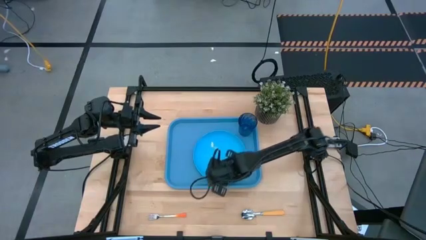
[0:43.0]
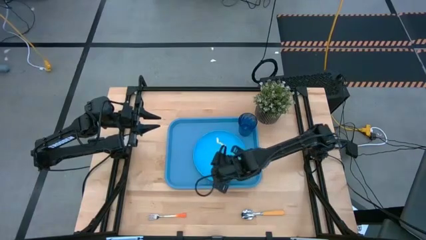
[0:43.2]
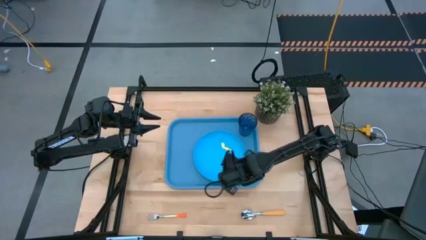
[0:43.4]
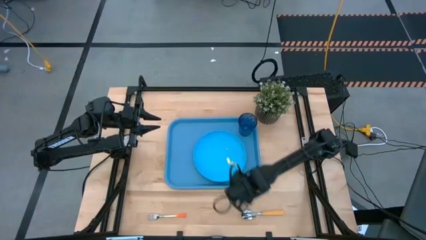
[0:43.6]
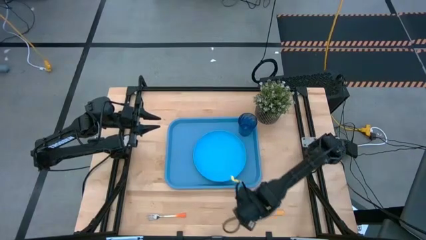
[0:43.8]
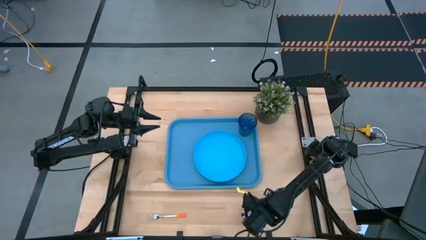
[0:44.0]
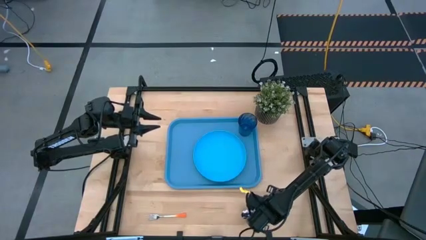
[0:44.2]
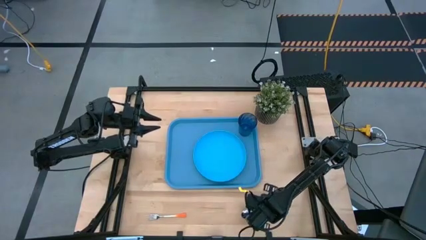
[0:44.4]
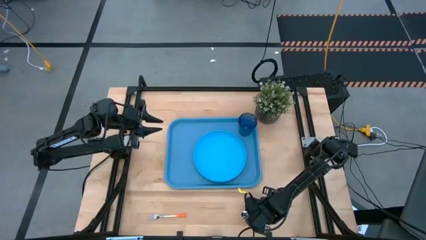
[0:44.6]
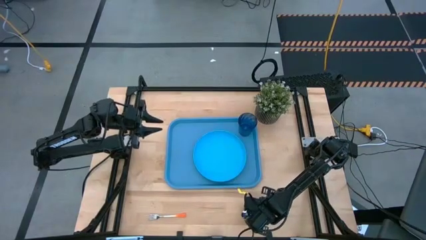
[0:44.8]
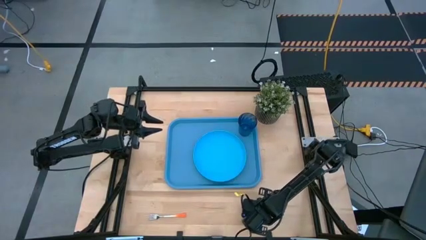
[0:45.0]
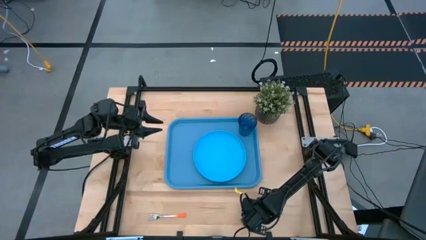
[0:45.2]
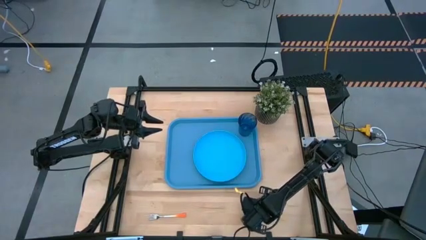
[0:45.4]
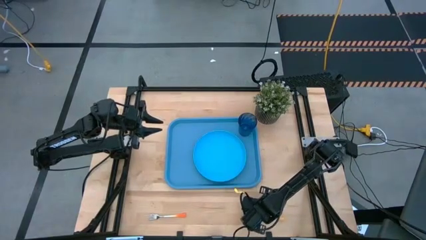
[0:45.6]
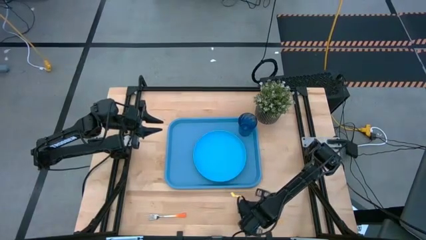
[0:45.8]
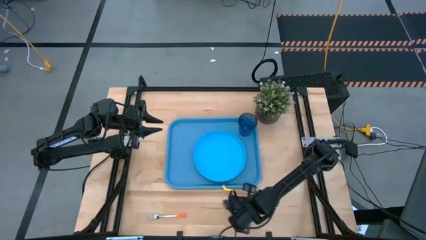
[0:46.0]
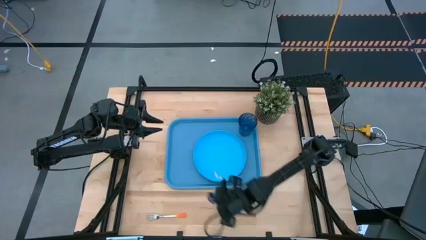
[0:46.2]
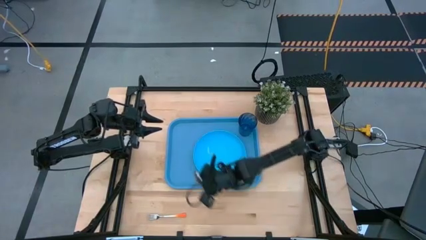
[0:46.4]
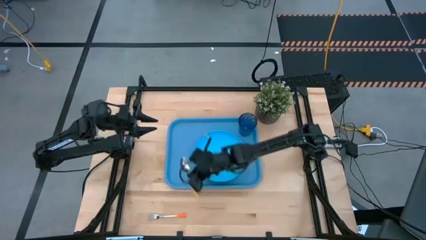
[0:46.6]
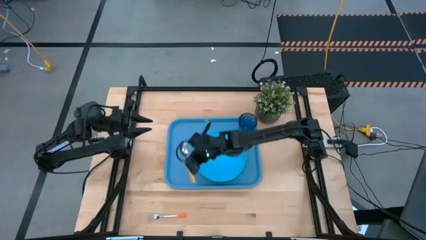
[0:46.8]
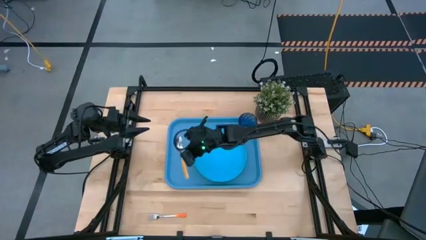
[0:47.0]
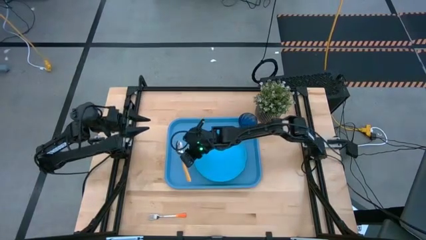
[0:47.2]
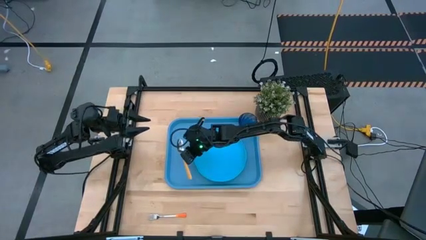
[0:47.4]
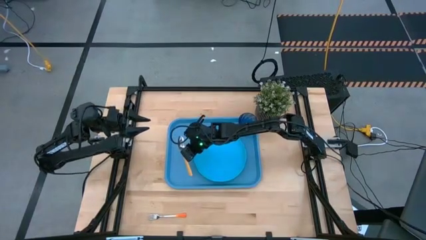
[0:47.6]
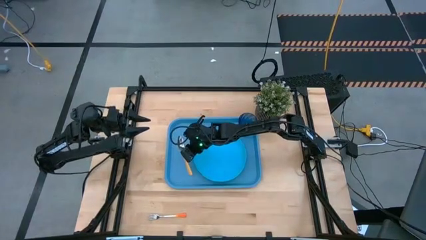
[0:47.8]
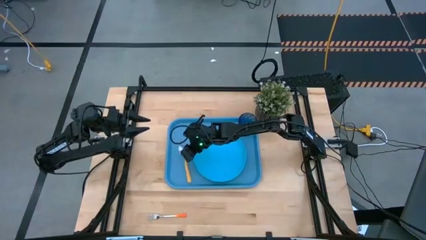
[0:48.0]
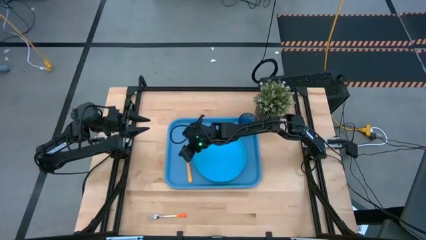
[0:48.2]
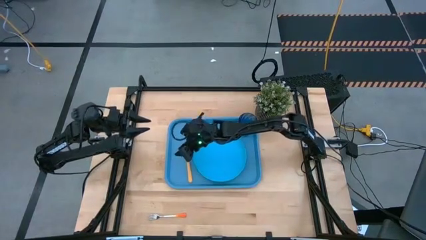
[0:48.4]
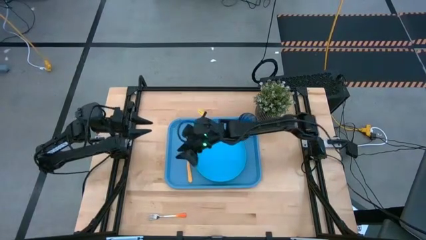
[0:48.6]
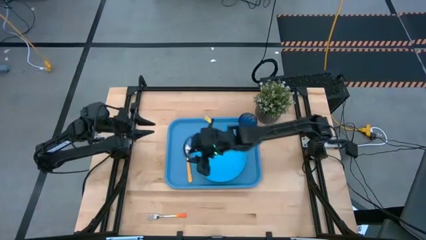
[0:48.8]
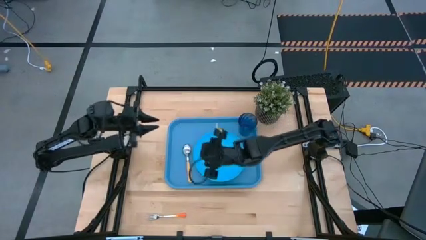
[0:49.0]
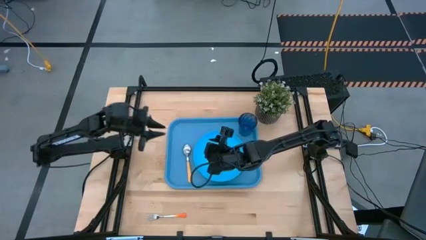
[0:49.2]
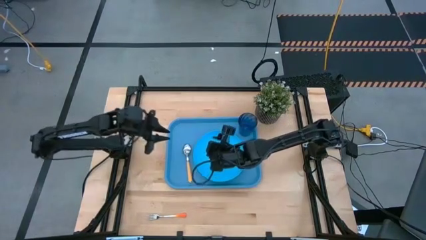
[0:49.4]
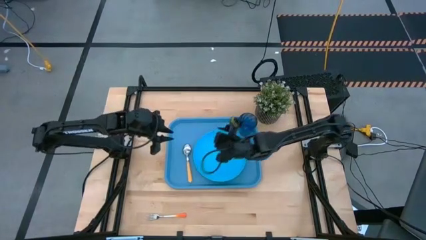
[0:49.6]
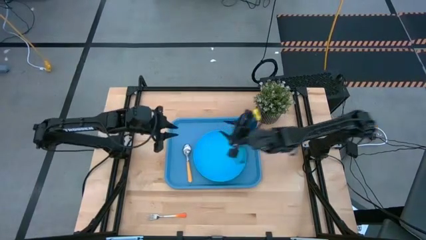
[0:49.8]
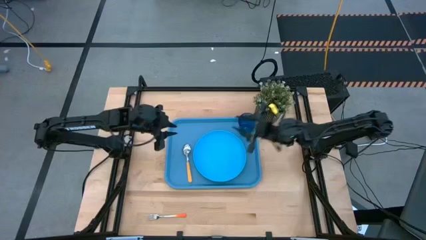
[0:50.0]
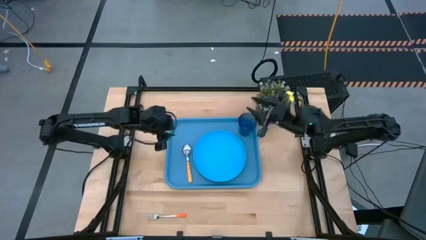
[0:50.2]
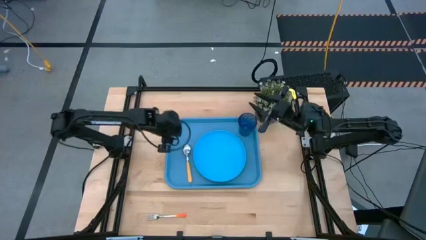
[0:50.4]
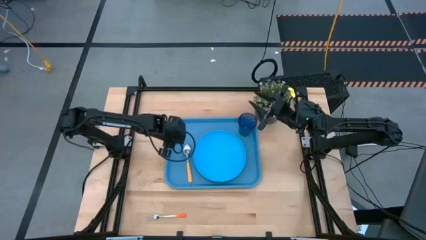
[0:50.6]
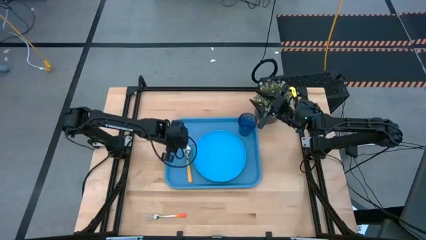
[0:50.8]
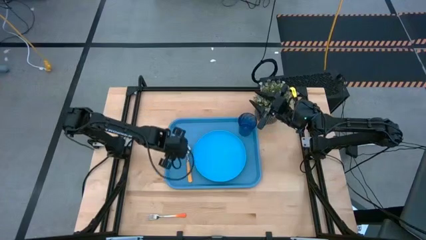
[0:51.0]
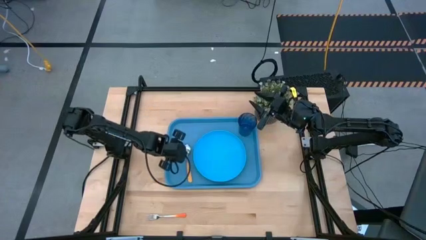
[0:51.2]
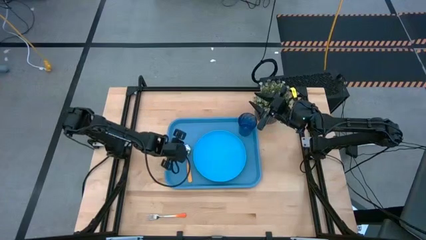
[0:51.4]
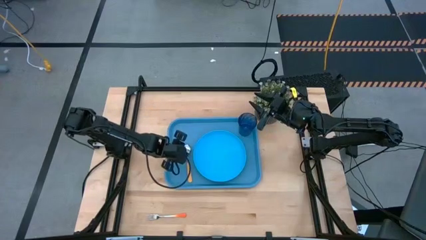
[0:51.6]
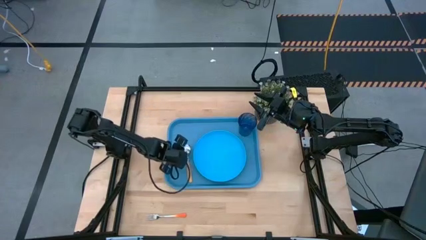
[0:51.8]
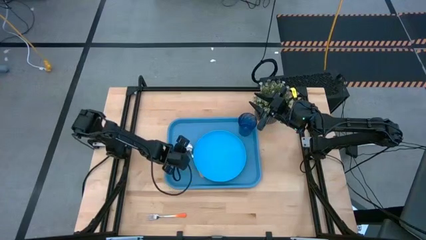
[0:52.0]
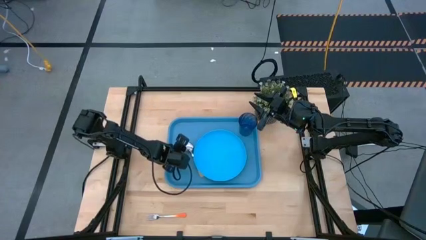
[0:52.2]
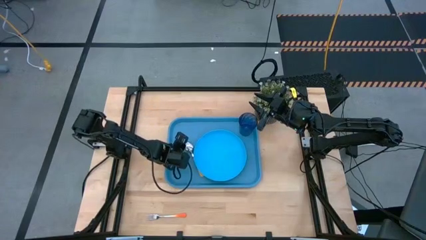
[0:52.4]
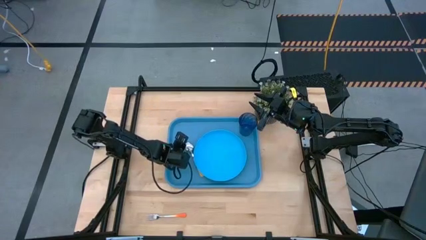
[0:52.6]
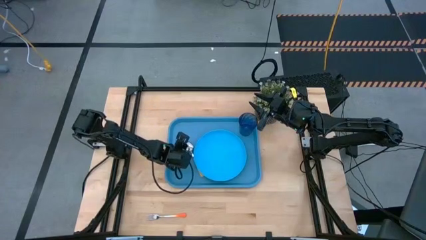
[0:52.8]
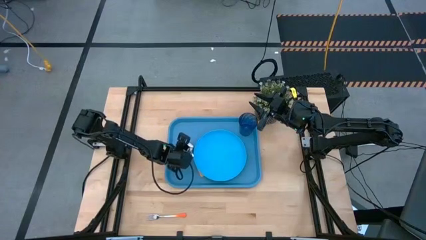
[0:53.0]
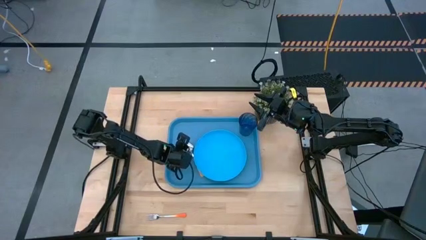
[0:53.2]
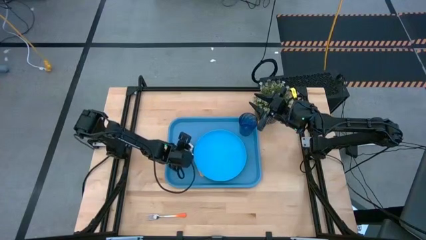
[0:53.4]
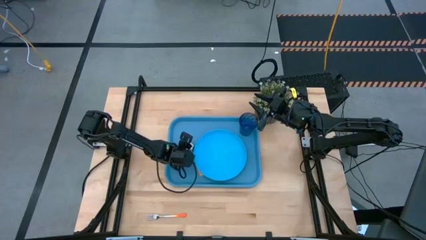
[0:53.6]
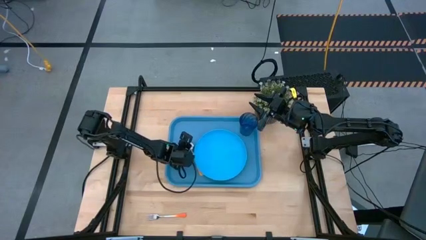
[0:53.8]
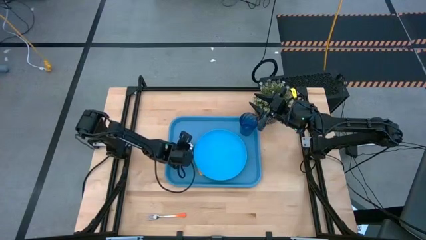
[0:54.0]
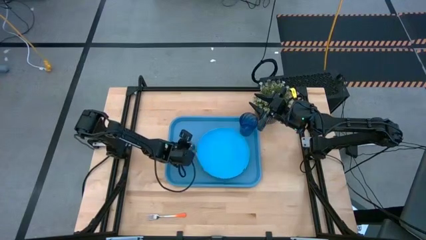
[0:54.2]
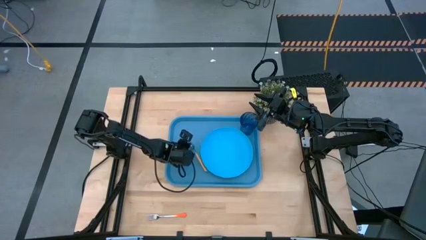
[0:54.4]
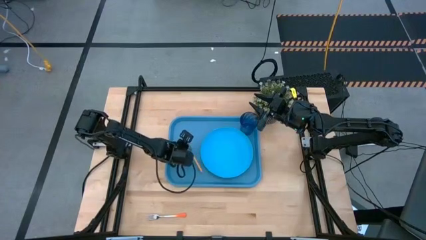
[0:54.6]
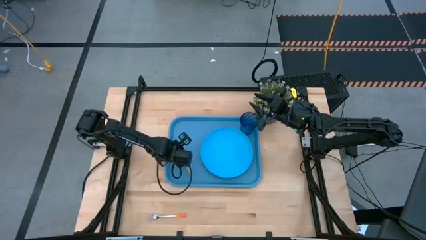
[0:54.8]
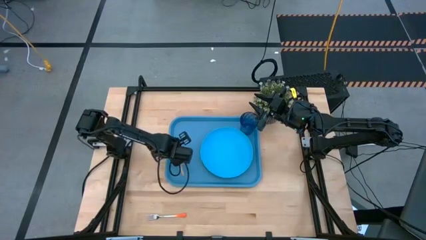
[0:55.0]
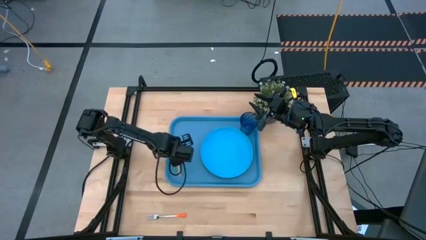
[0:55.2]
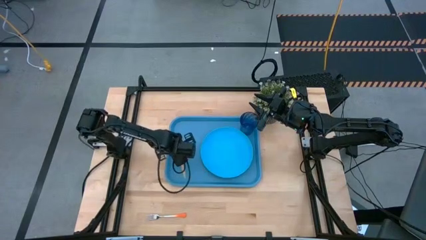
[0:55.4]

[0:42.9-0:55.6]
Task: Pick and place plate/cup/fork/spoon on tray
Put the yellow spoon on the blue tray to the left of the blue plate
